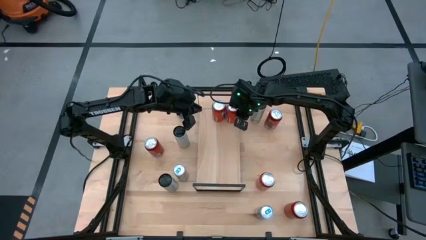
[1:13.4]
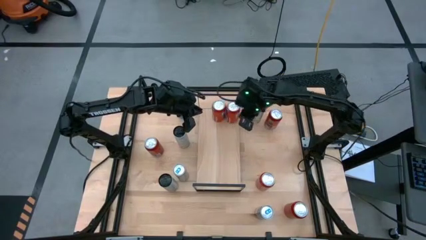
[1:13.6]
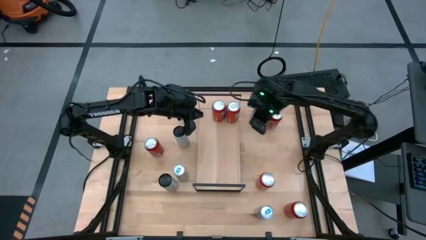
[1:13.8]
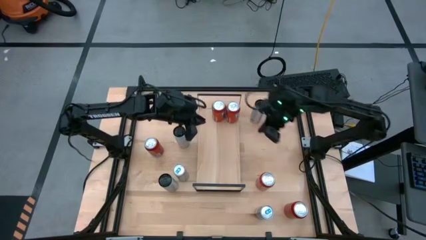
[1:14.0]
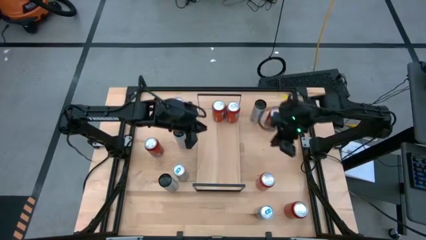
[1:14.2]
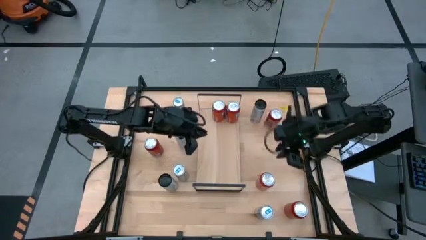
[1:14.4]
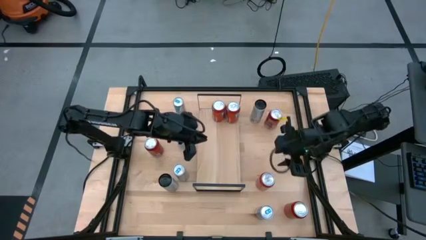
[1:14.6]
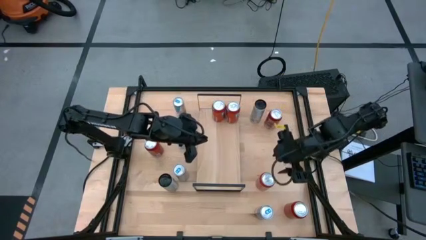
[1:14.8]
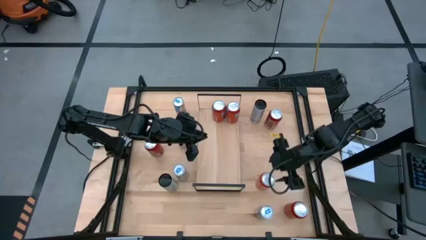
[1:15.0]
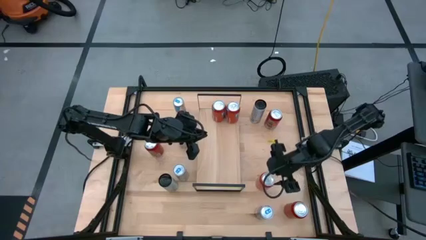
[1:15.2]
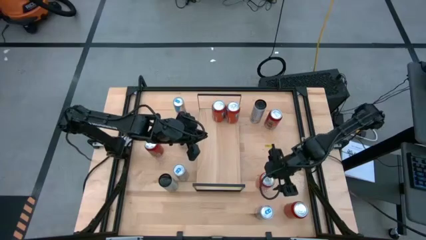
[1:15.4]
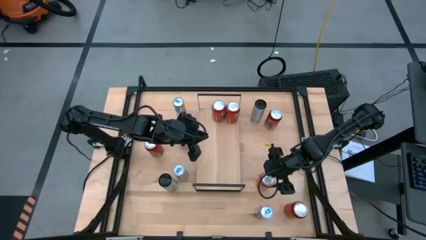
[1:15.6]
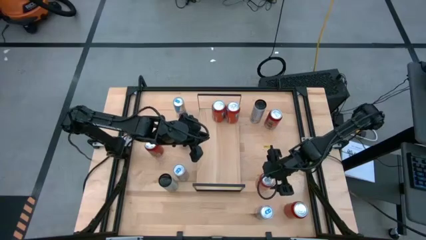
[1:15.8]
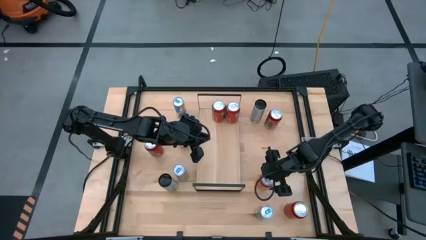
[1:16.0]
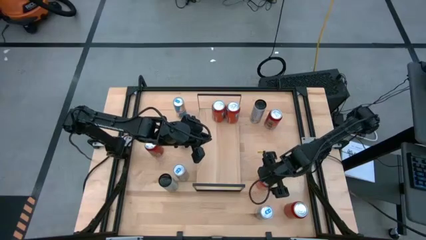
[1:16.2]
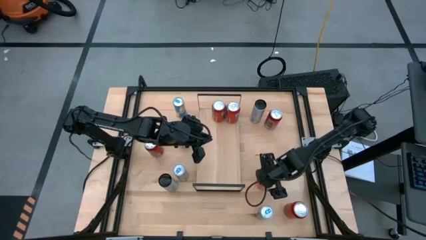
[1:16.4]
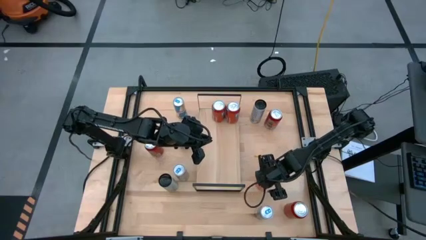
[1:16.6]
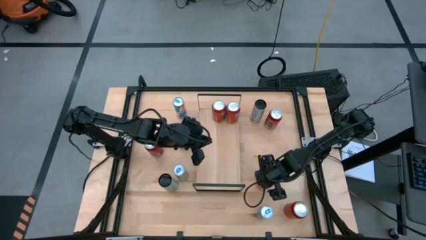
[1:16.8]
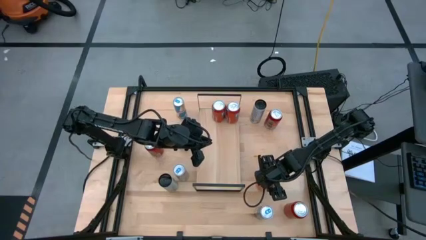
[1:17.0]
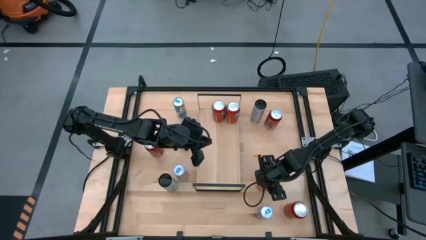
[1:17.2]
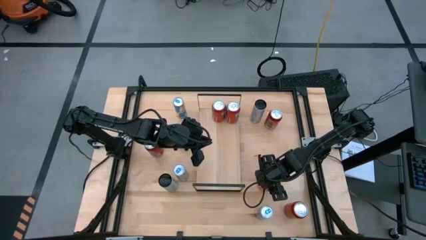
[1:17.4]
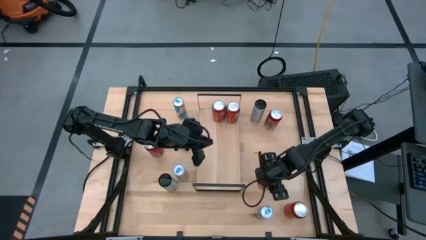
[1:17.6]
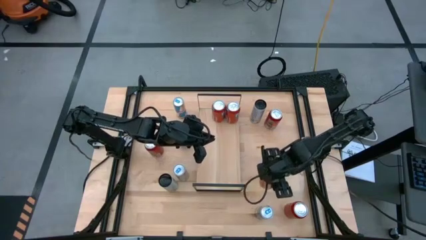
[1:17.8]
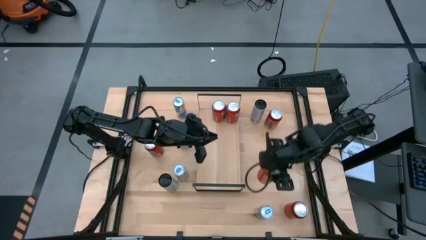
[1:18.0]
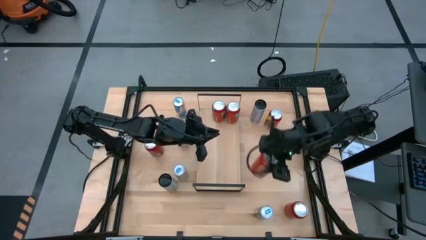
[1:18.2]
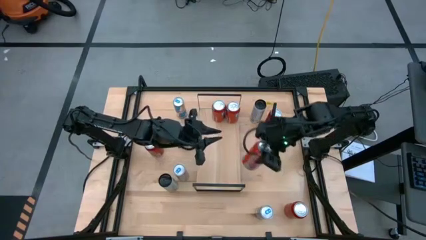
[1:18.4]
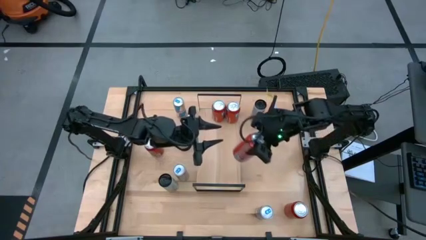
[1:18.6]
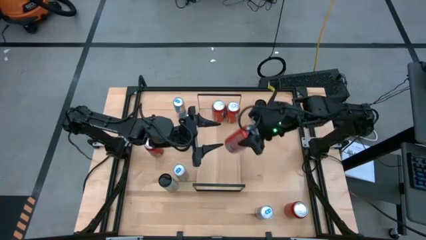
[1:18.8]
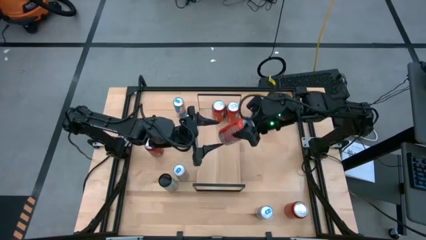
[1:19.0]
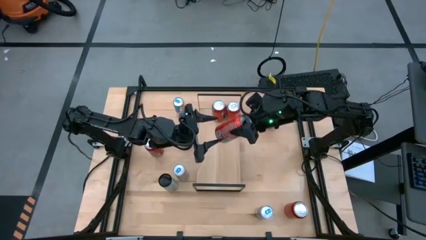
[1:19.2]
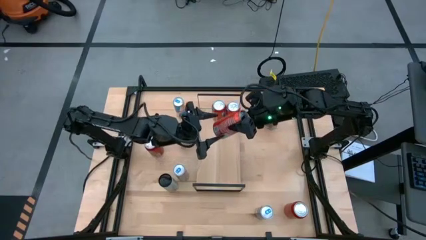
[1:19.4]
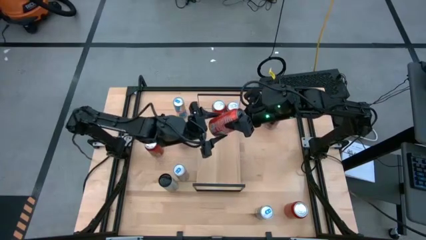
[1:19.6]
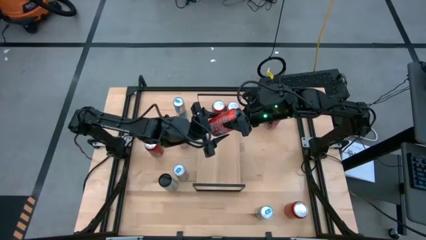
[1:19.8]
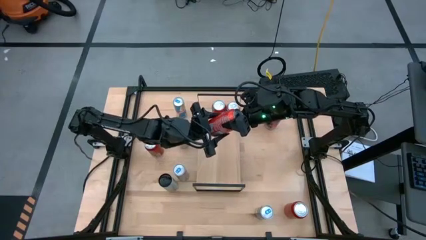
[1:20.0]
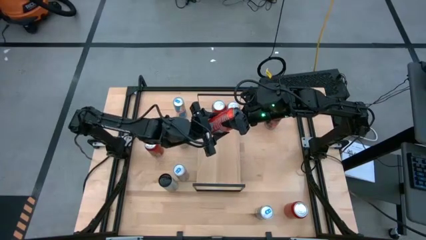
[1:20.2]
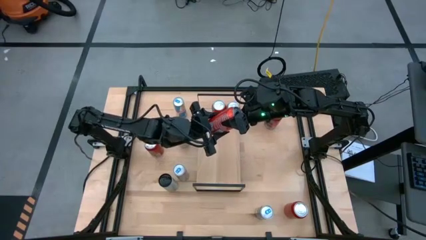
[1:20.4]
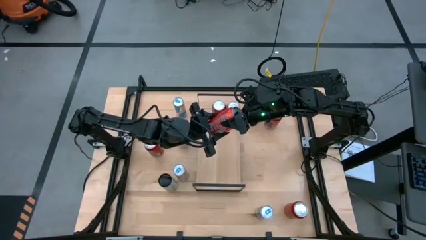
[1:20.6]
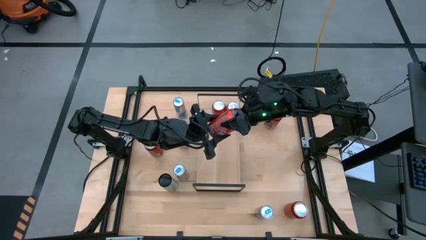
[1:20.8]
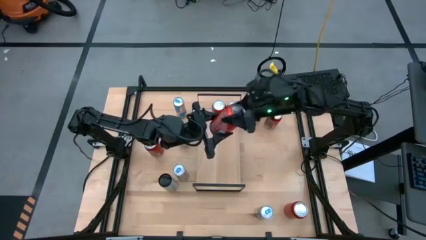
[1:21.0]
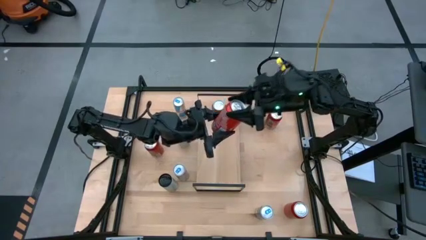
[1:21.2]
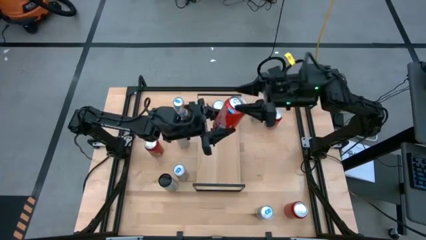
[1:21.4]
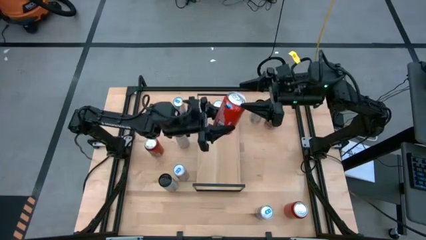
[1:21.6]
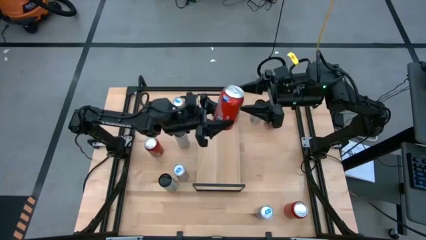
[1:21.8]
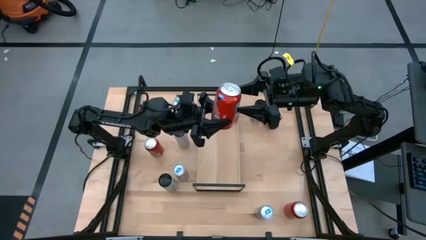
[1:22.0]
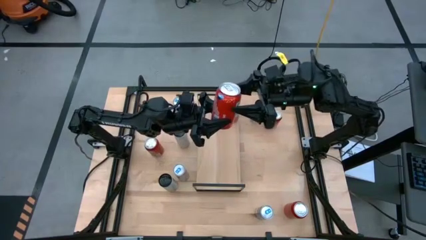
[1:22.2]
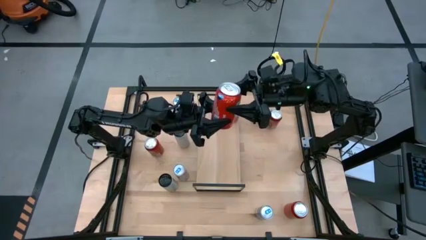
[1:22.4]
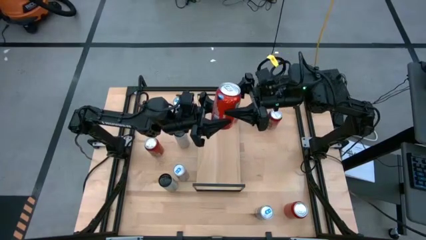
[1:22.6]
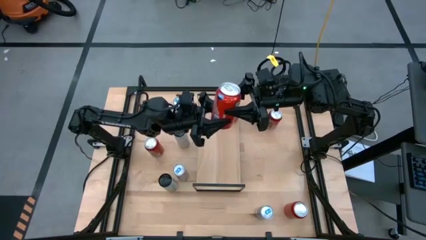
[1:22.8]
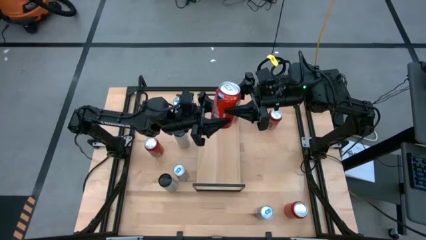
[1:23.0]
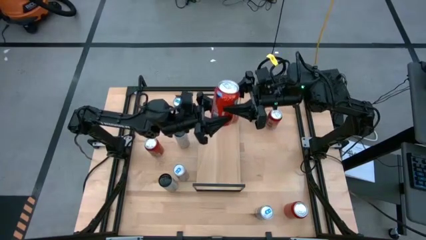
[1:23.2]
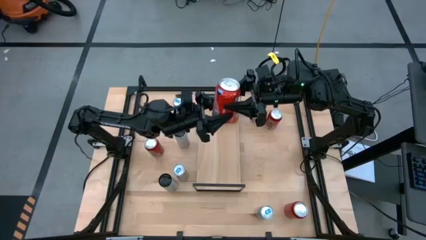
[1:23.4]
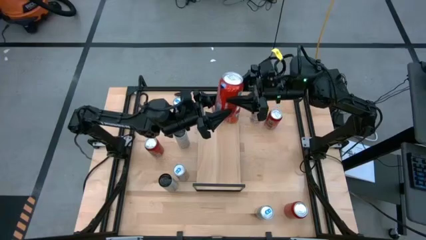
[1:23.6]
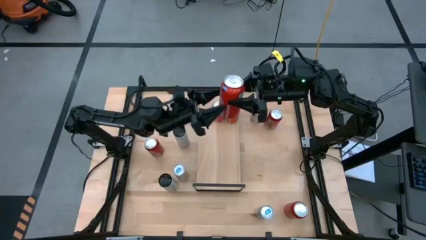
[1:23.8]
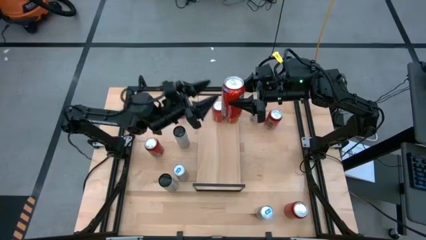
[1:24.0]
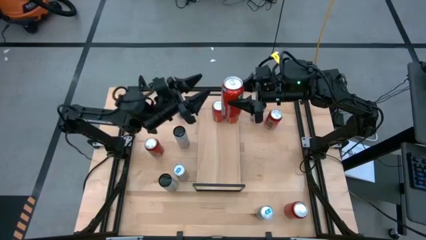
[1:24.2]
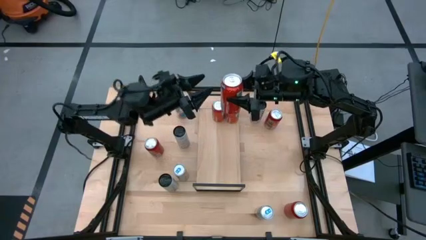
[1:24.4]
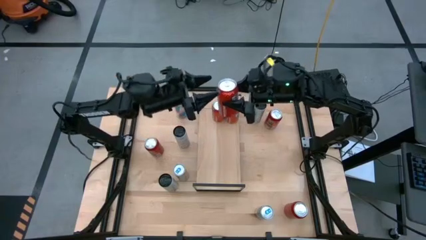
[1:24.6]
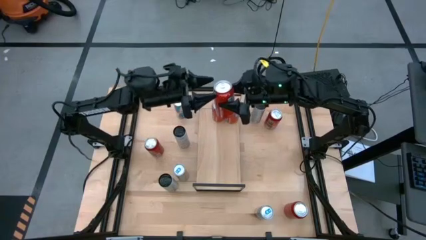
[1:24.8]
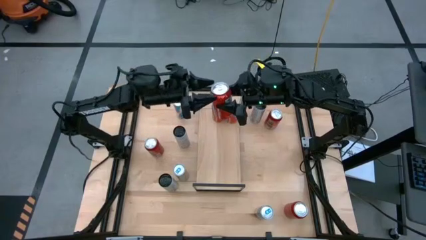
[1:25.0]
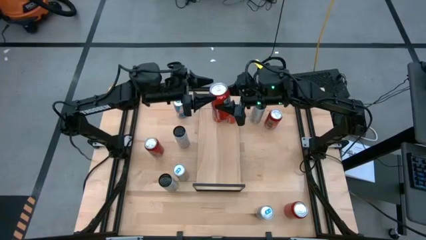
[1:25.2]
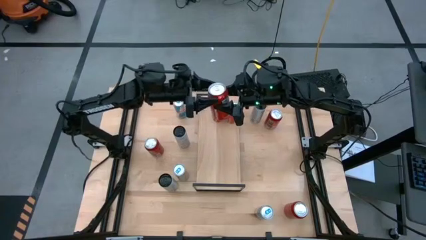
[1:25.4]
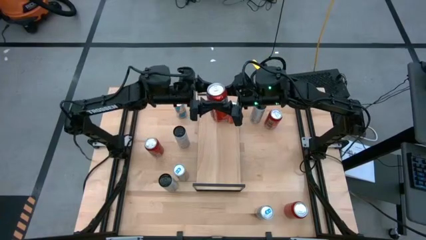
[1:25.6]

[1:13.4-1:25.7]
Task: Place canned beverage on shelf
Put the orange soda can on the shelf aligned with the other orange soda can

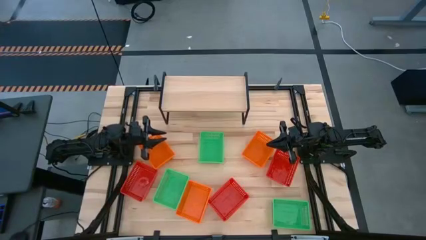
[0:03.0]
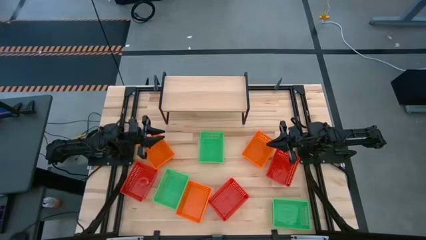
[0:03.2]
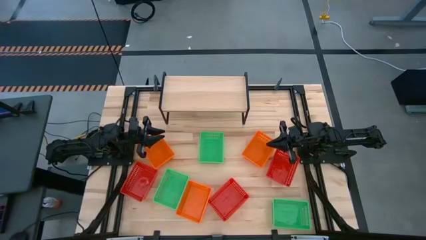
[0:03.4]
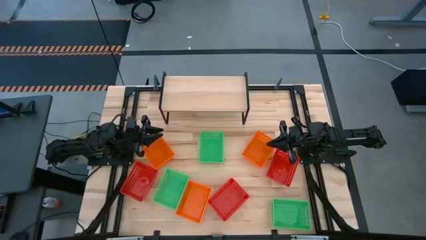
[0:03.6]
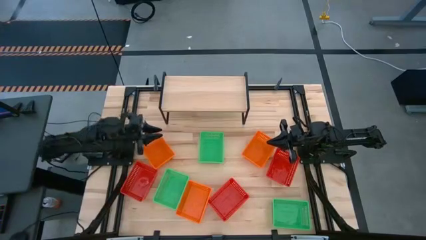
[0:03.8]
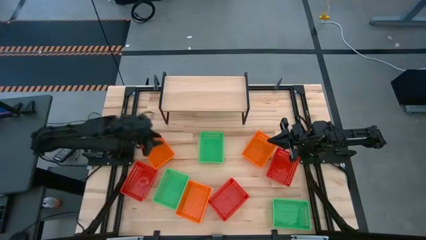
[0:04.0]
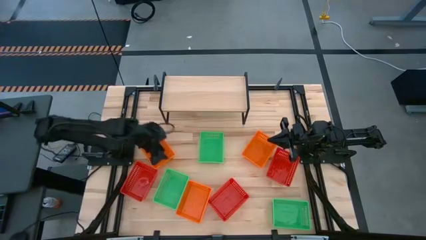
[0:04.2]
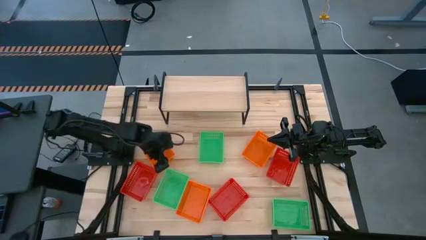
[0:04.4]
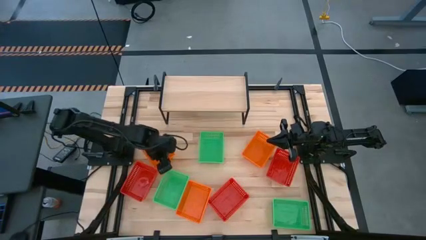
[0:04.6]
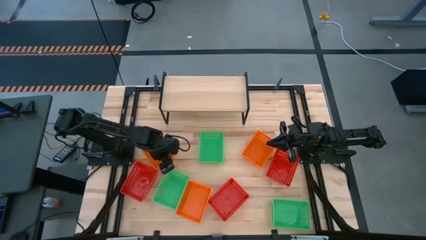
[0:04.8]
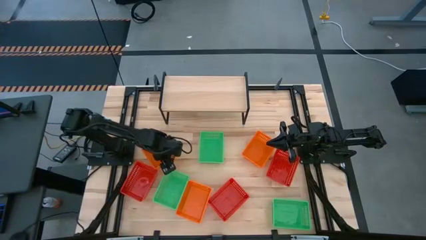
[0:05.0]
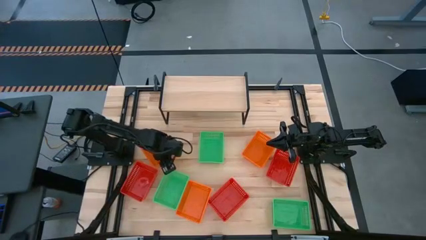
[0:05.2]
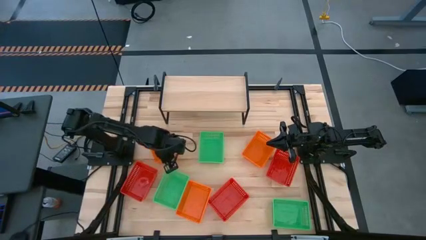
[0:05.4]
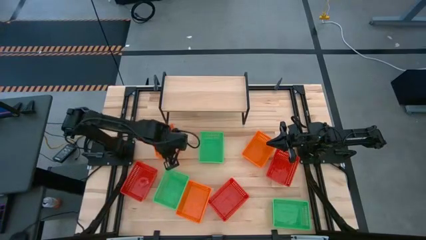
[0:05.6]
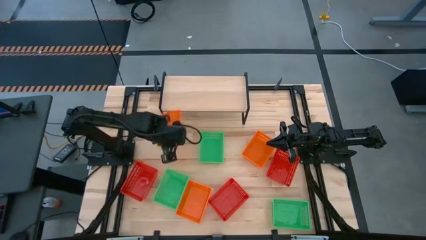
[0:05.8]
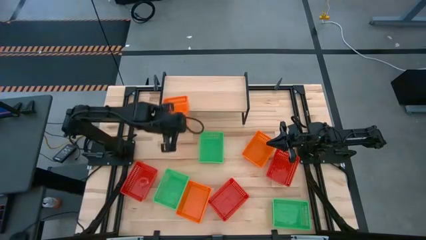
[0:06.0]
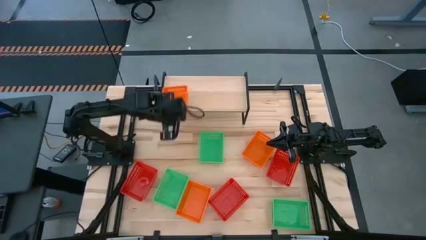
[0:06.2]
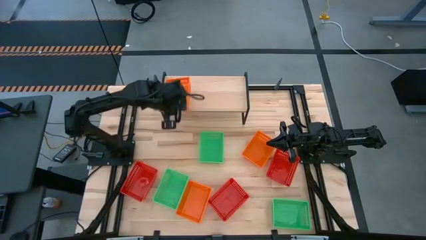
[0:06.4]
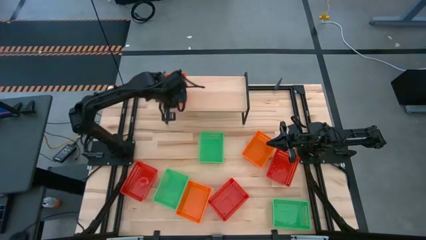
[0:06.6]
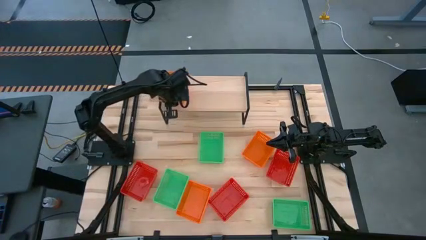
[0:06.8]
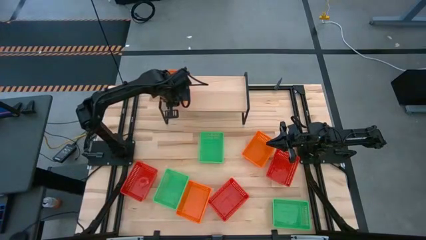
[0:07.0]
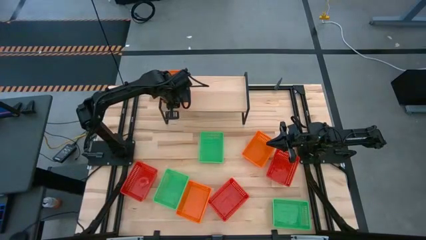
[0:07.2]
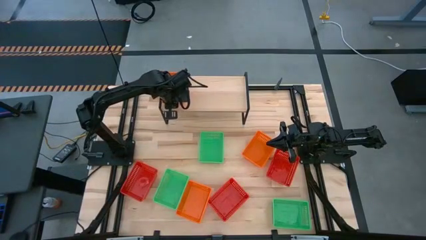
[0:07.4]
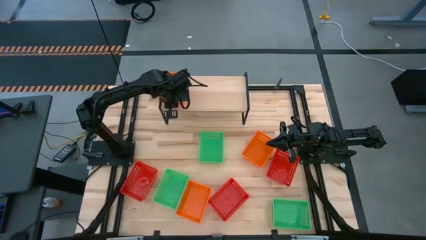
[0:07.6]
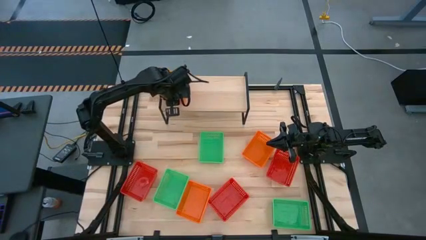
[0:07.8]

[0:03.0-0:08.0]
Task: Stack baskets on shelf by color
Put the top left orange bin on the shelf
